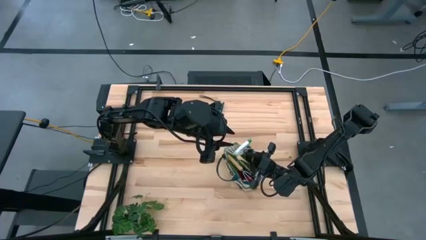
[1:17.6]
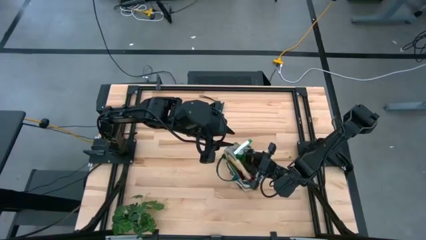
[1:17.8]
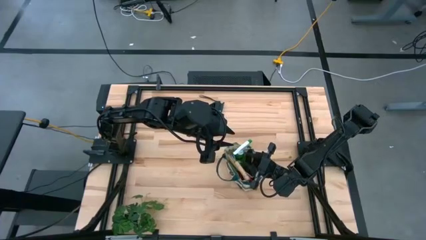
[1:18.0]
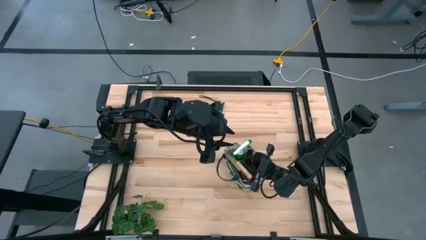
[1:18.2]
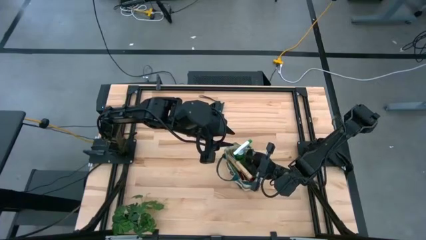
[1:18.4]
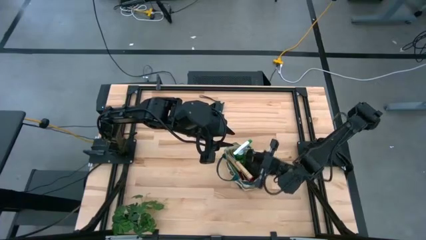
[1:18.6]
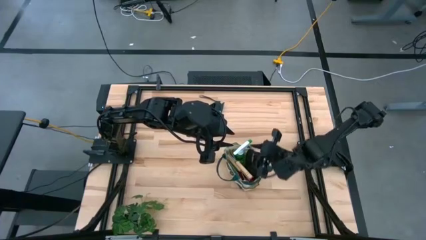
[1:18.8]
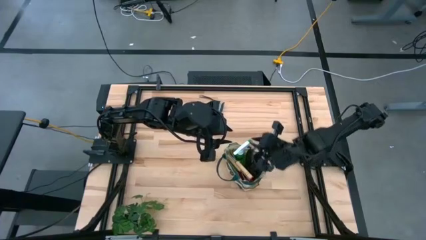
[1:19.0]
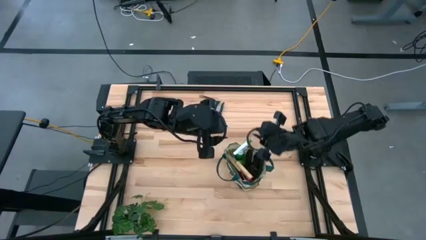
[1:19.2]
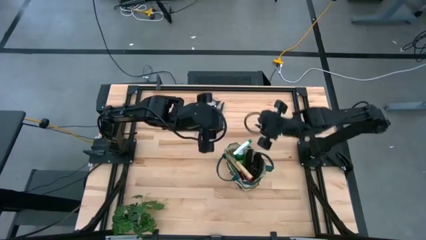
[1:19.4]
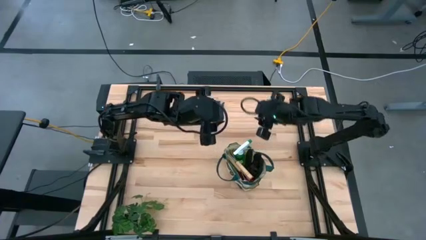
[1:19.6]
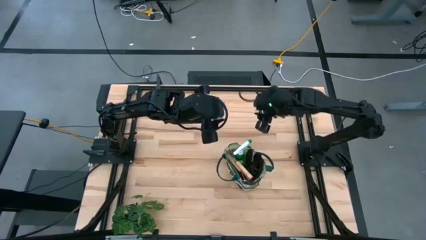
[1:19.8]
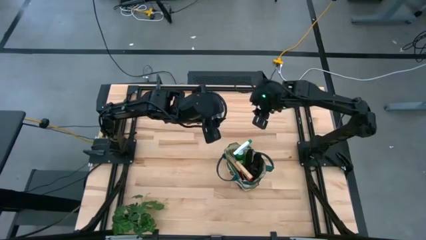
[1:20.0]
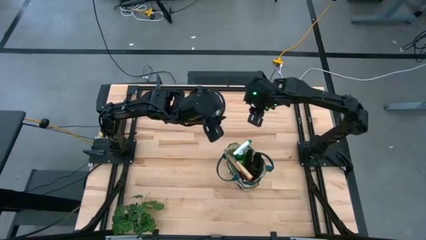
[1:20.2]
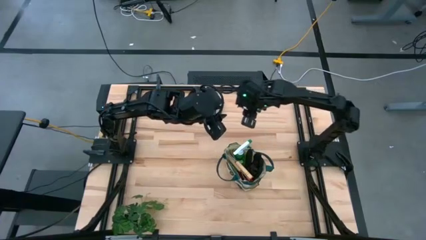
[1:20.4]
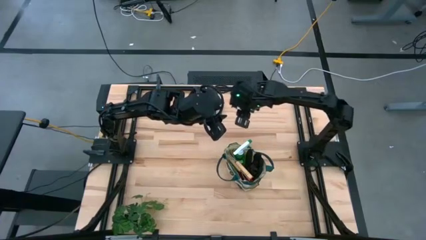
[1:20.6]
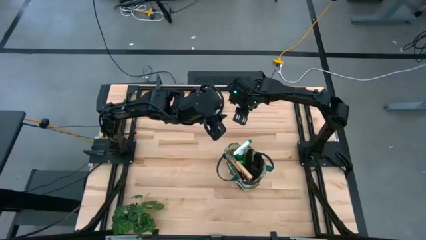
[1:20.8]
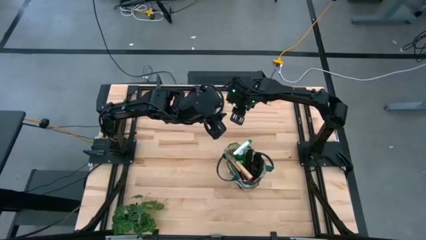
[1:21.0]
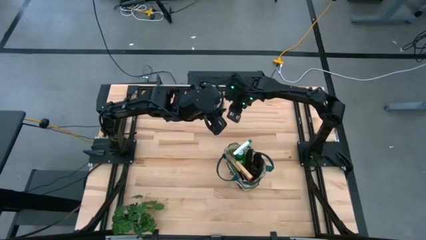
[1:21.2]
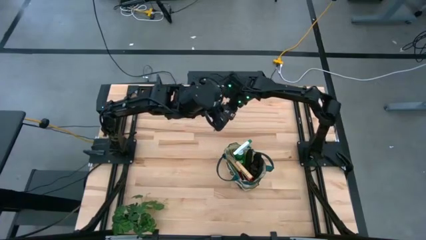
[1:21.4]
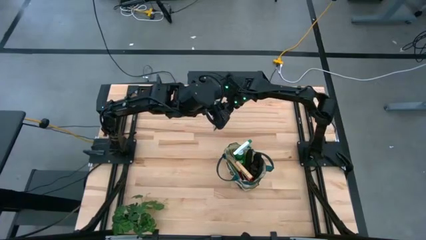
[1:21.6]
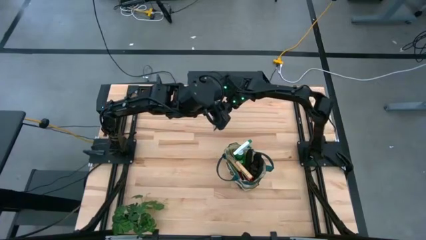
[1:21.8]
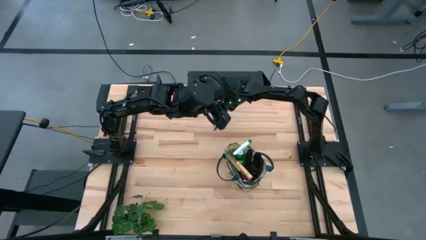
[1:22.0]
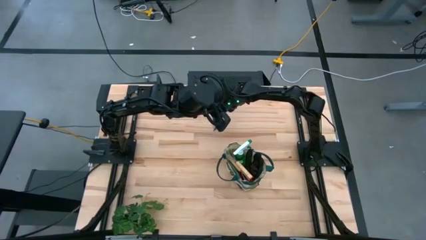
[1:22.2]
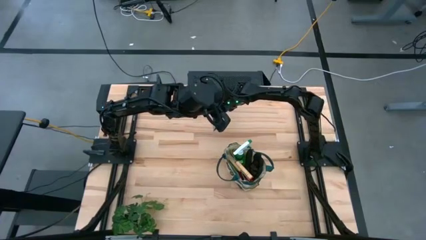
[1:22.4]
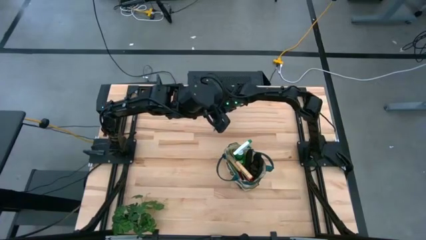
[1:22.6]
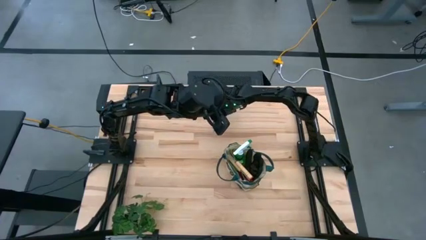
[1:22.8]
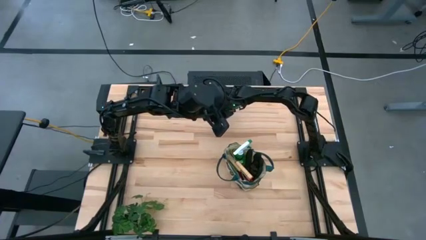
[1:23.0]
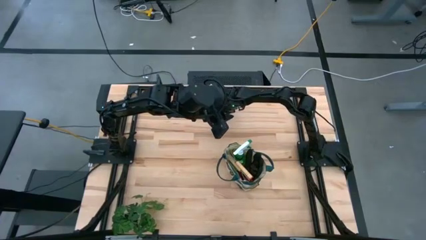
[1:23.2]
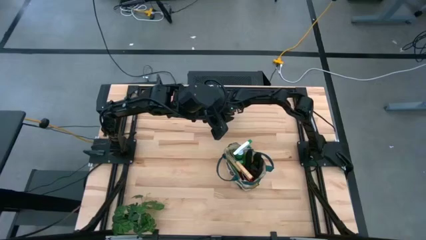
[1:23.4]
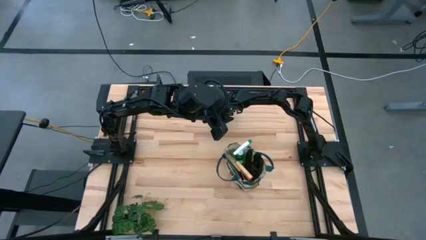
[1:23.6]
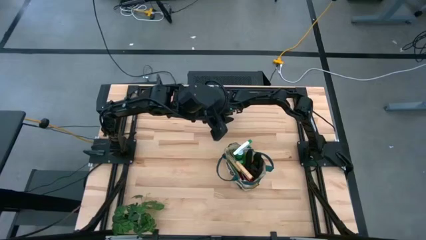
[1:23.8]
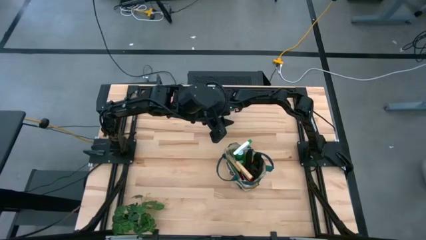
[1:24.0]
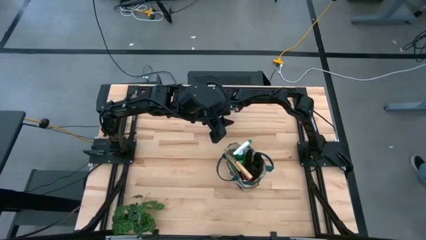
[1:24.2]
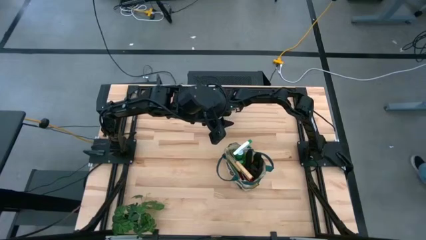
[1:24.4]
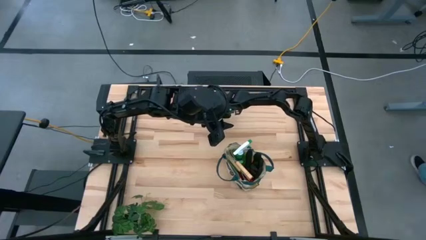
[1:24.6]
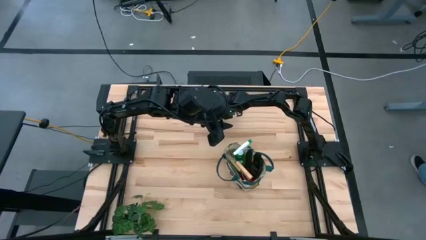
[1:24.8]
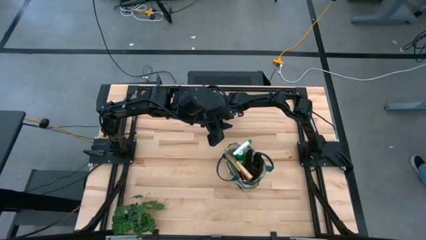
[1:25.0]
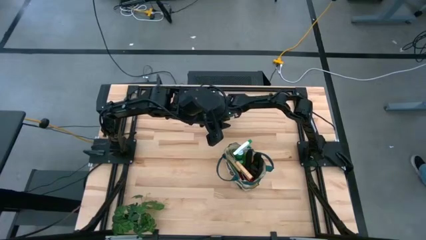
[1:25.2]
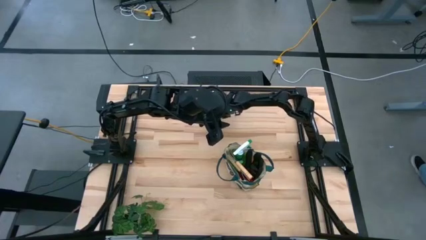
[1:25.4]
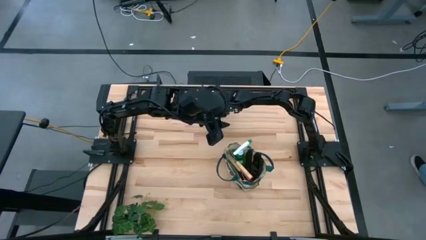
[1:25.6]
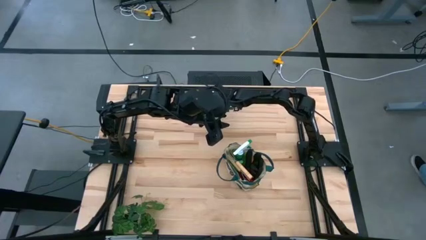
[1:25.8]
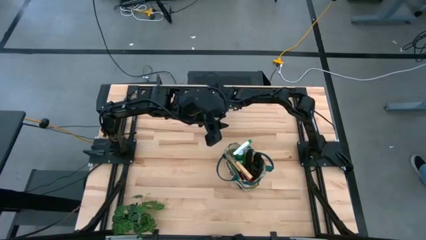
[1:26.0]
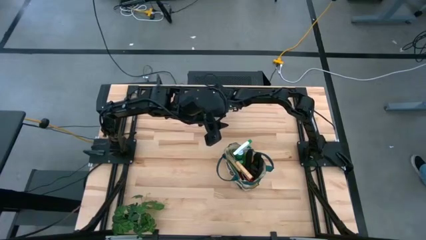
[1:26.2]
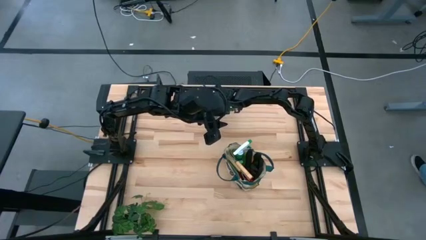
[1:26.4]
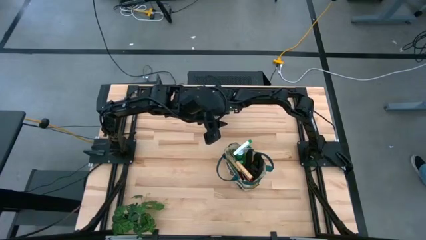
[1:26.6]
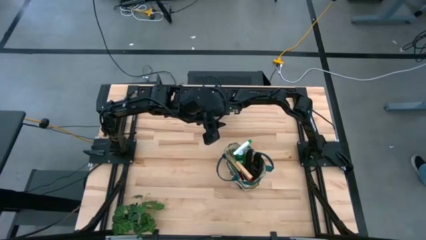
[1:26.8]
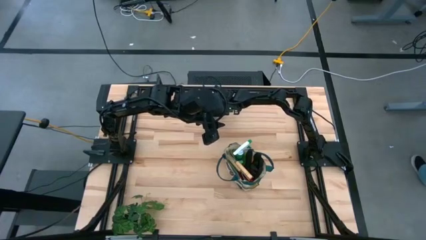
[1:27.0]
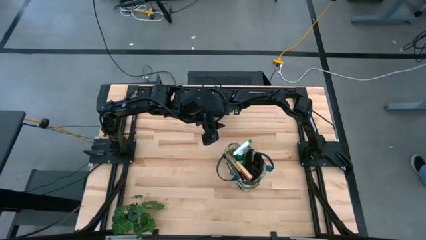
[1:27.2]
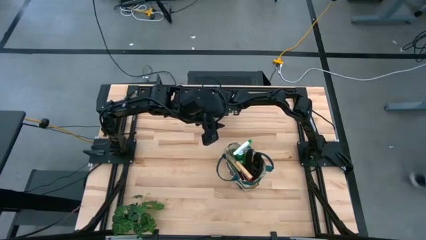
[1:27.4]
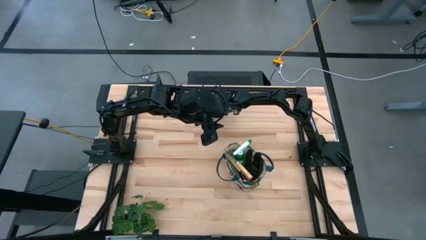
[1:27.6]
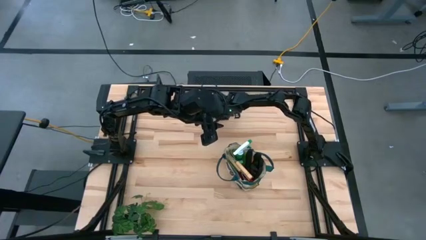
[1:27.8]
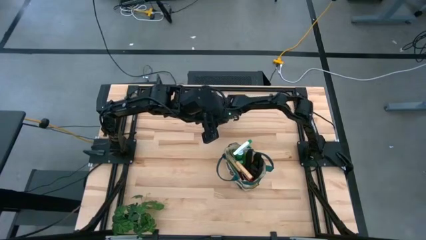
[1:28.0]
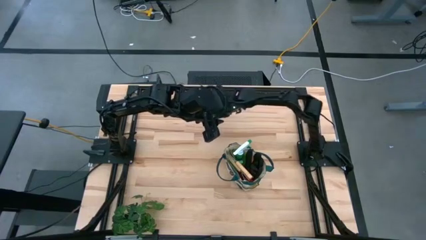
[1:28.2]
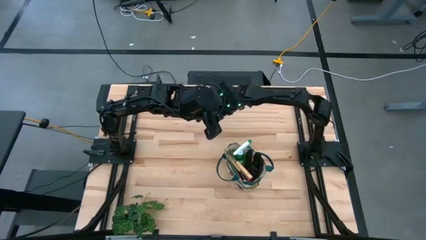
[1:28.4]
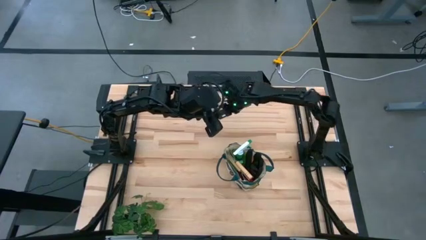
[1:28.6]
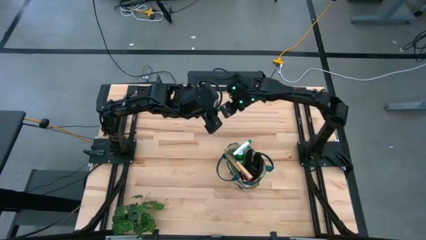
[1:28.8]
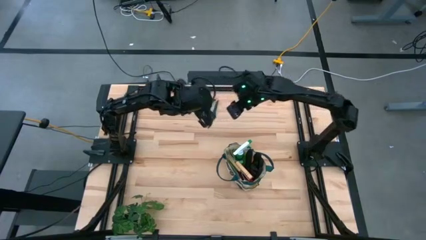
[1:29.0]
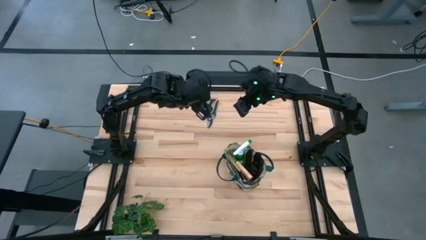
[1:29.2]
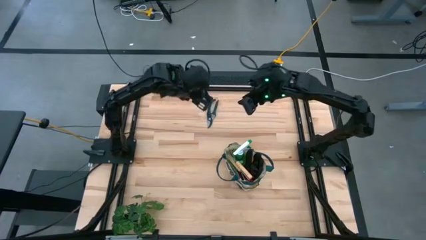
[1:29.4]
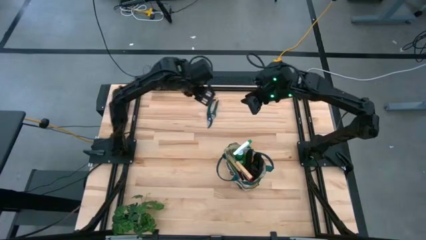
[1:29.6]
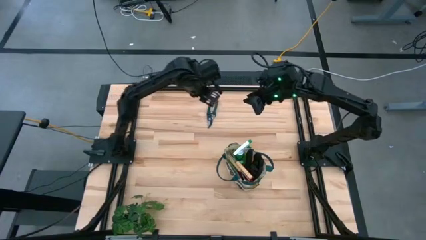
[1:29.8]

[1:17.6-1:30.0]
Task: Pick & Place Garden tools in Gardening bag
Put the green shear scissors into the green gardening bag

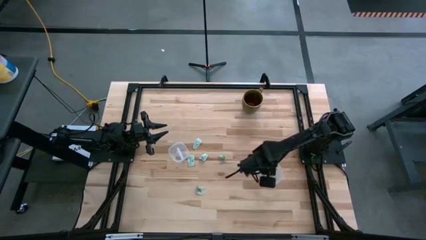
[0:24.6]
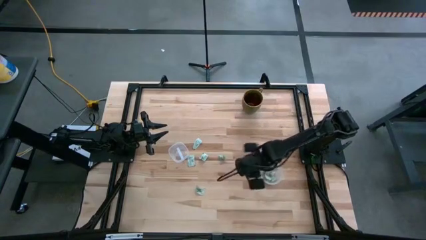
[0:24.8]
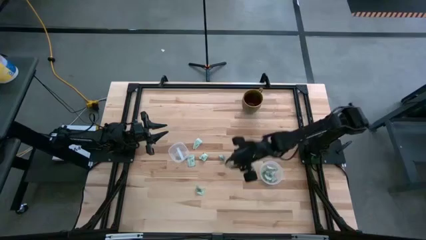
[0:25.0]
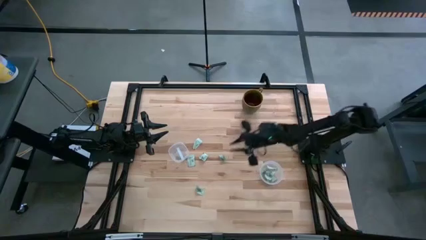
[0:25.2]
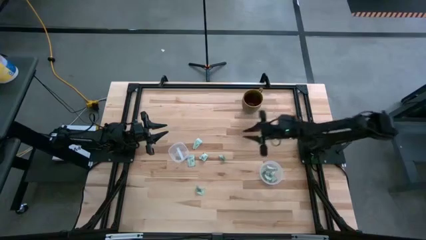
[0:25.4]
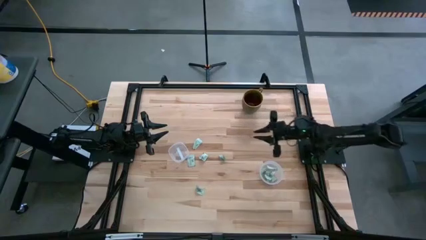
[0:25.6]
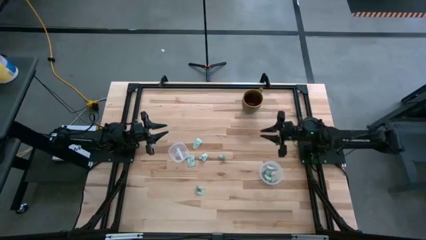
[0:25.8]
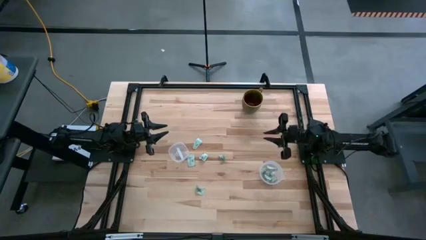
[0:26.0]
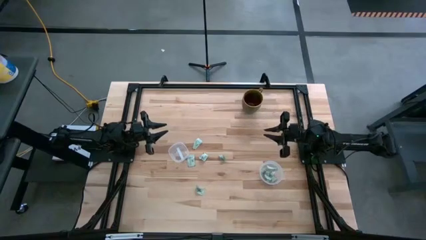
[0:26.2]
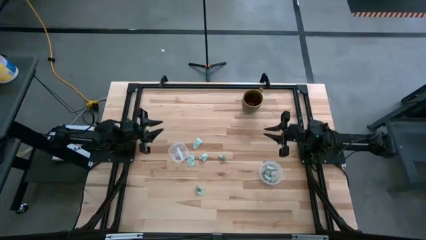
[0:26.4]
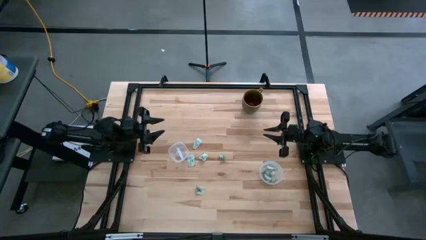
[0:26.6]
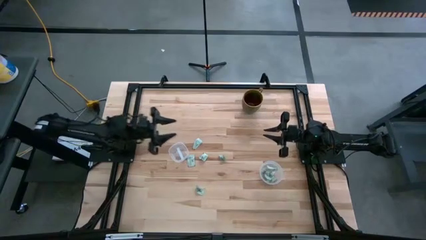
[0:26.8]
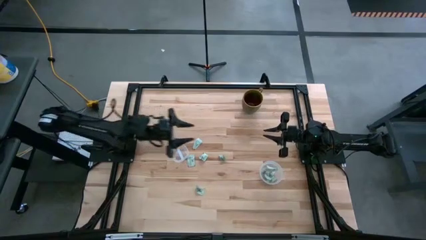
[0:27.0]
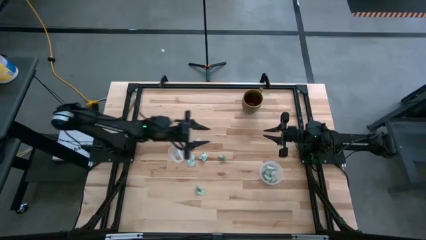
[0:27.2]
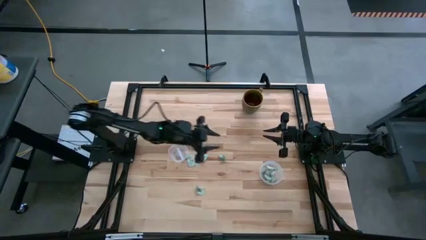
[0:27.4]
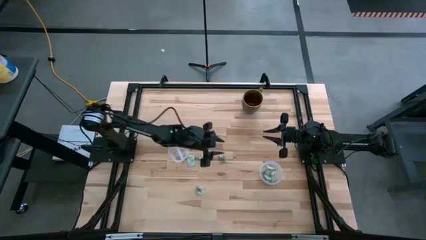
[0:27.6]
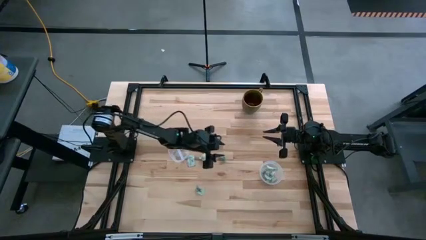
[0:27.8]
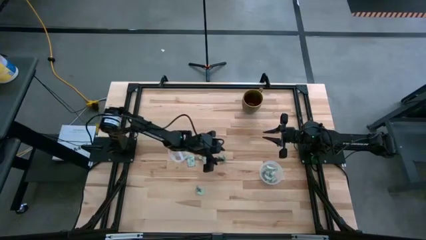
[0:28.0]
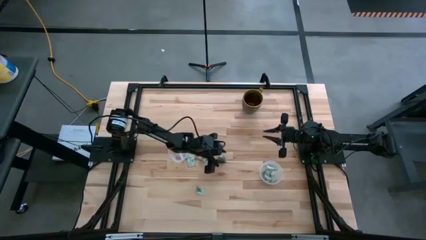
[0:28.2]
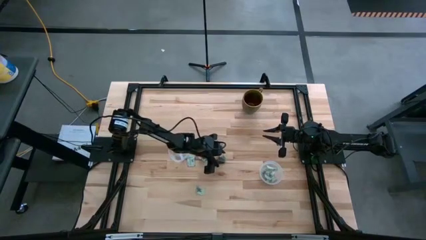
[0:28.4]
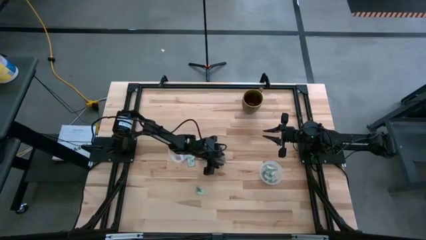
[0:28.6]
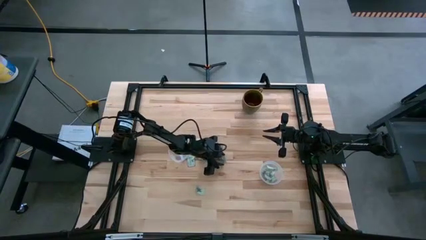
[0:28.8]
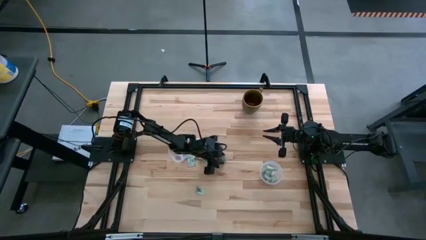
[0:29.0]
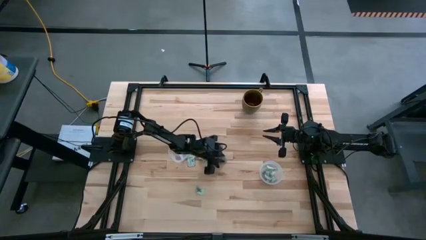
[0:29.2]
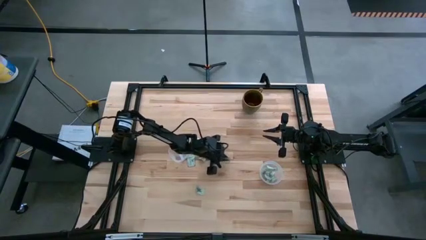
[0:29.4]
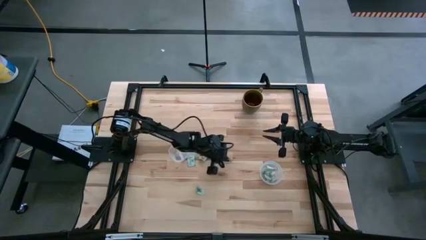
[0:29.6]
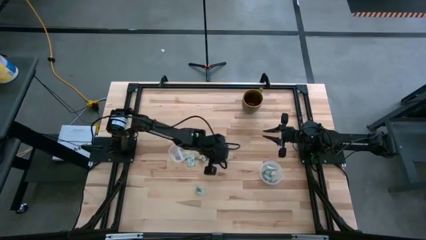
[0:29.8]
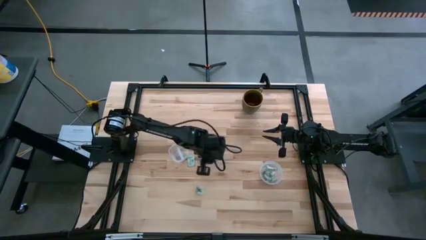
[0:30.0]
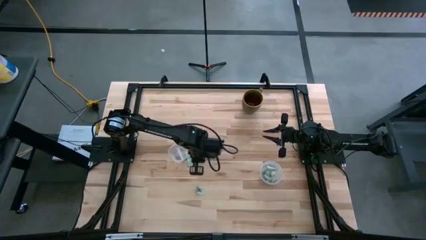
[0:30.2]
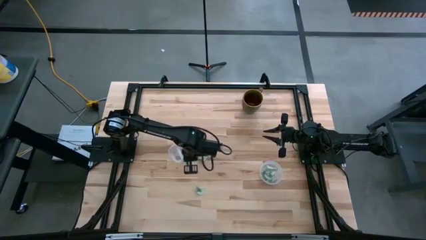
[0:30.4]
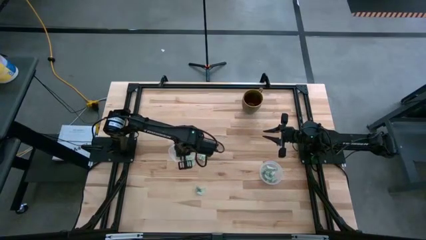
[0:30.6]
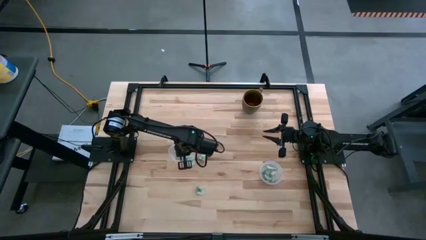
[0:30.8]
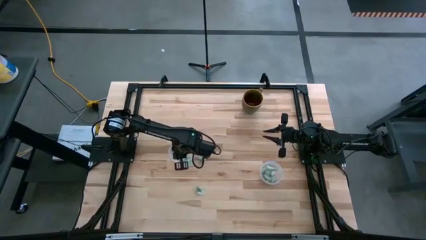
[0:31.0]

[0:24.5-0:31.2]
Task: Pick and place Stevia / Truvia into bins
Put the stevia packet into the square transparent container
